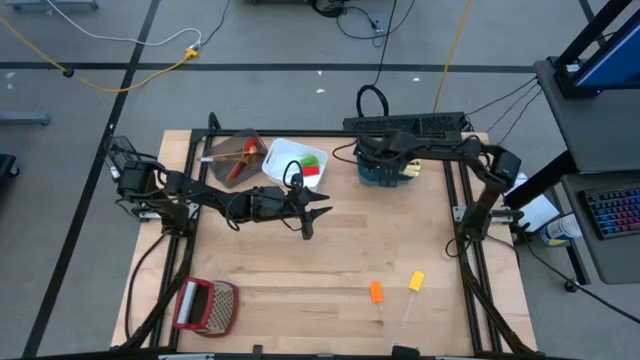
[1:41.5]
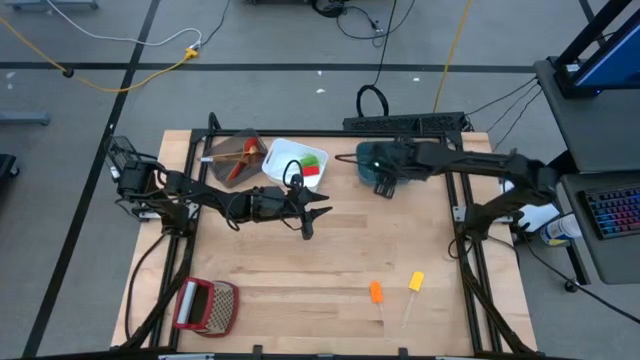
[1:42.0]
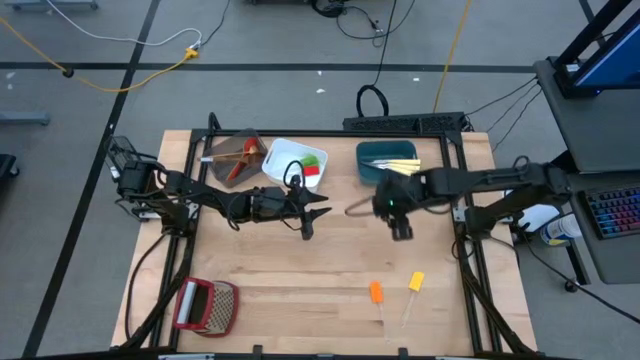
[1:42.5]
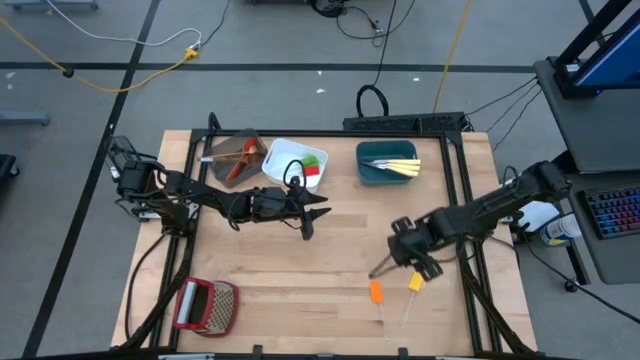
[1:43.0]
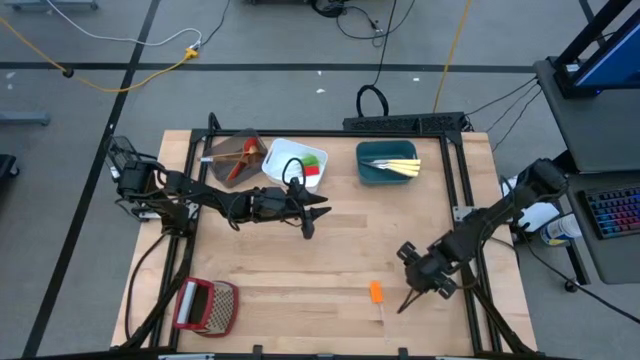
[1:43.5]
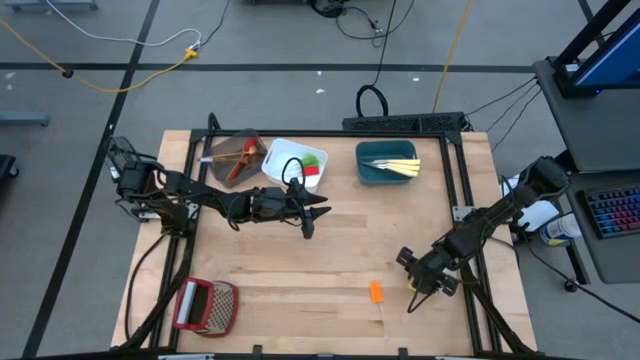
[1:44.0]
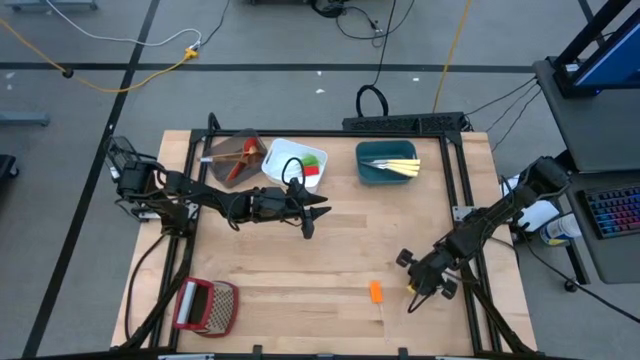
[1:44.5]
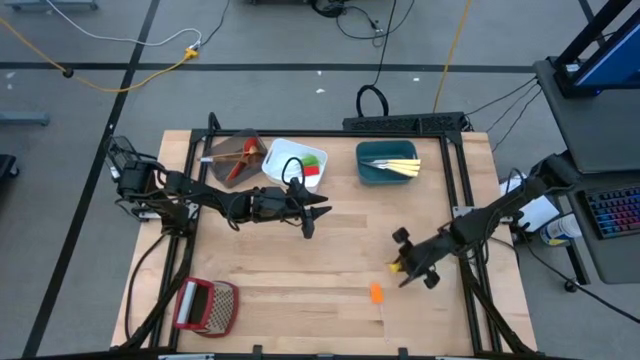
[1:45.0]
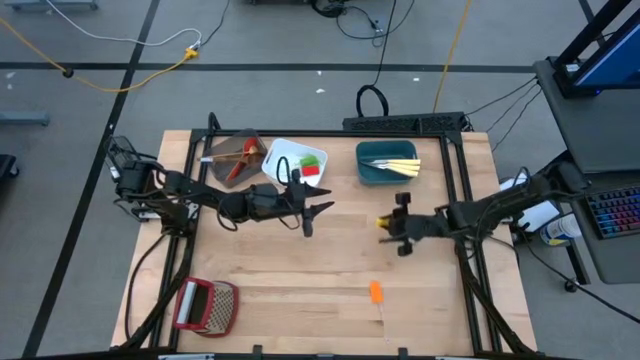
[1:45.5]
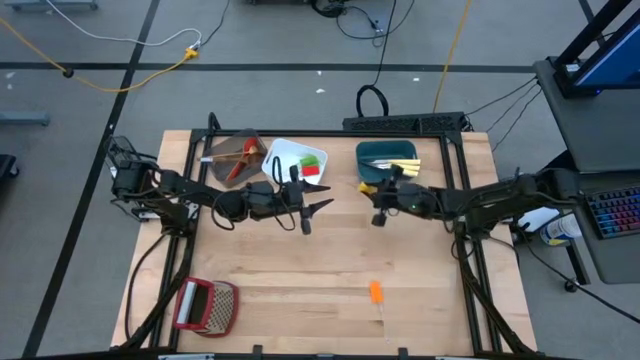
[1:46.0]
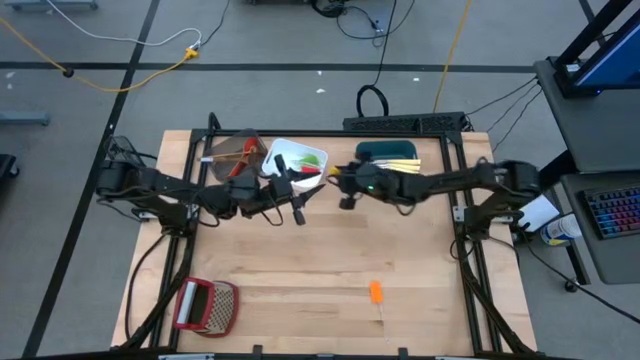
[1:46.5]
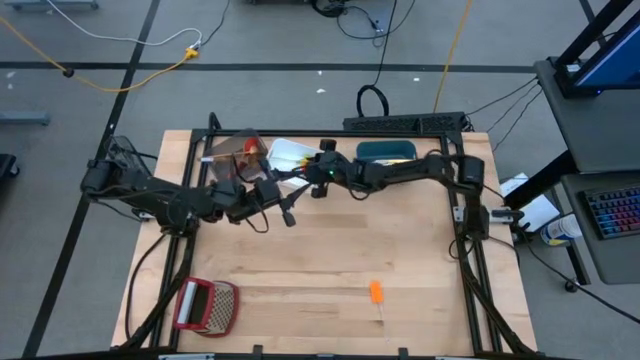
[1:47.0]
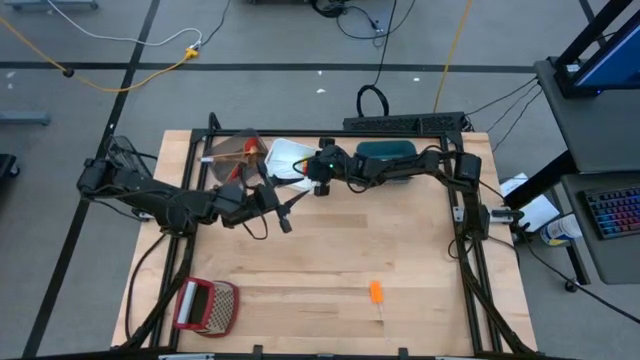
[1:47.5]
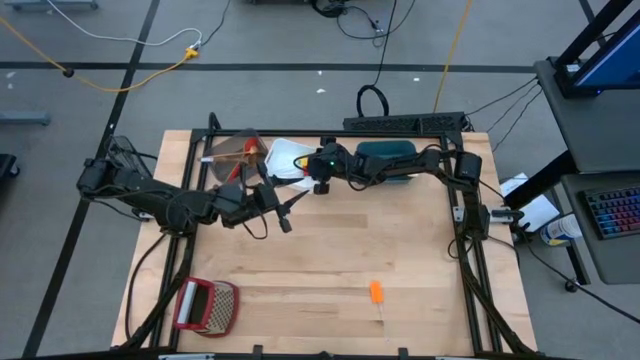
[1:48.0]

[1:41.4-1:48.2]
Task: Pick & Place Kitchen Items
Put the yellow spatula into the white bin

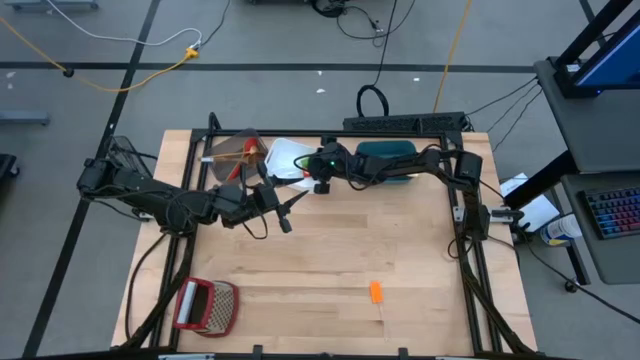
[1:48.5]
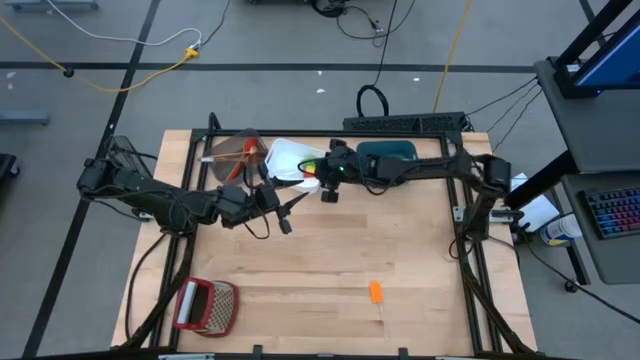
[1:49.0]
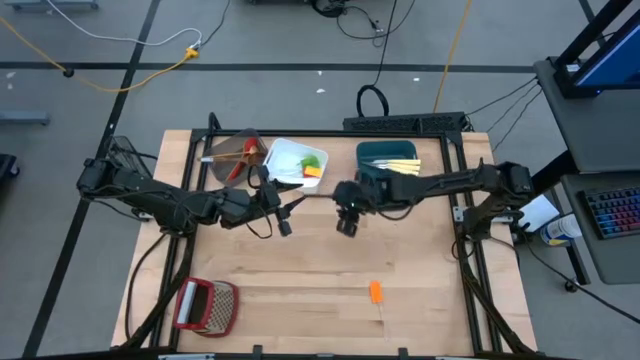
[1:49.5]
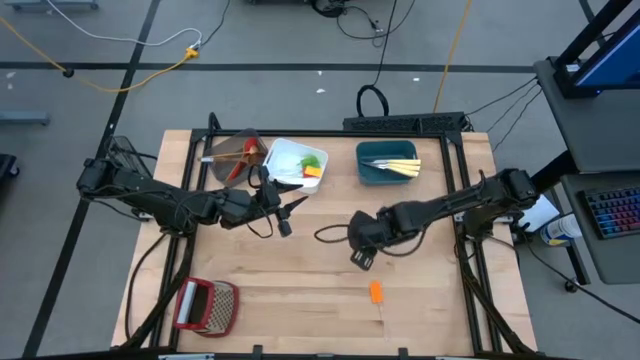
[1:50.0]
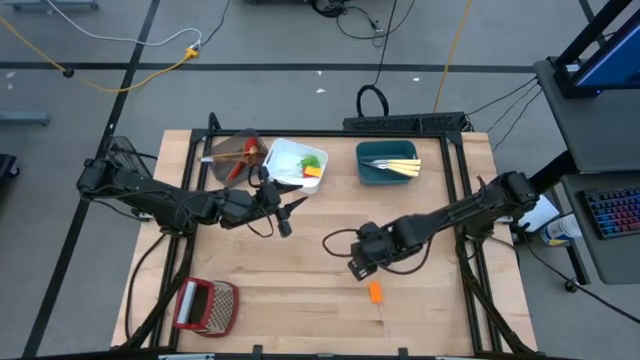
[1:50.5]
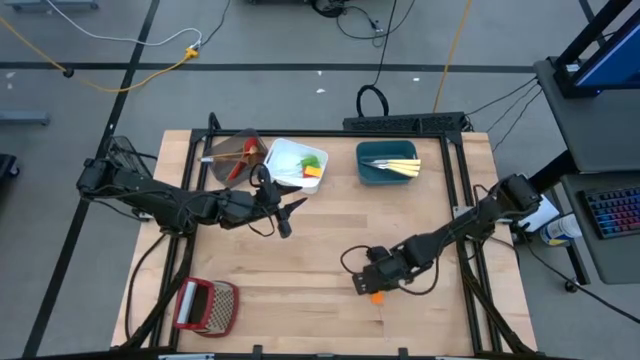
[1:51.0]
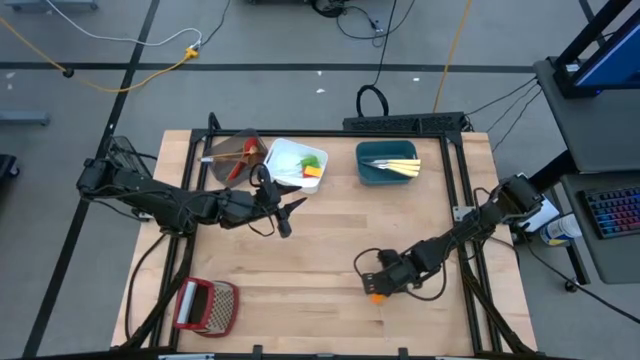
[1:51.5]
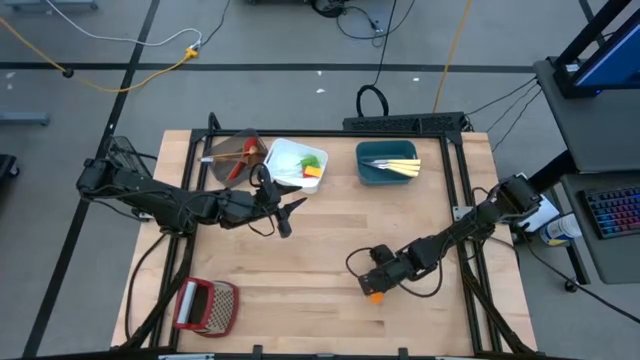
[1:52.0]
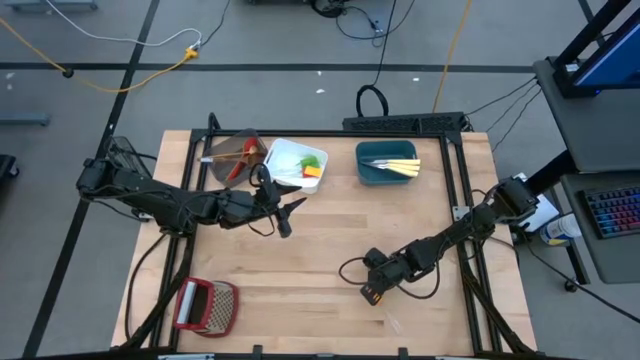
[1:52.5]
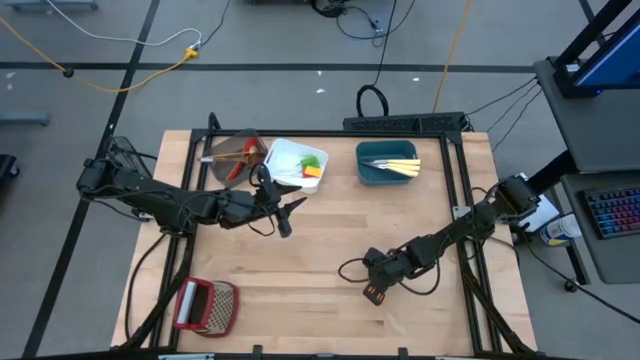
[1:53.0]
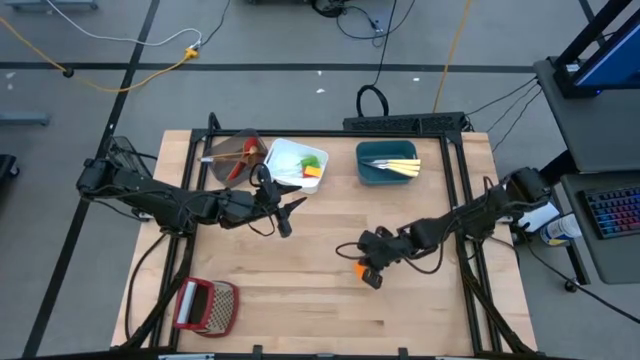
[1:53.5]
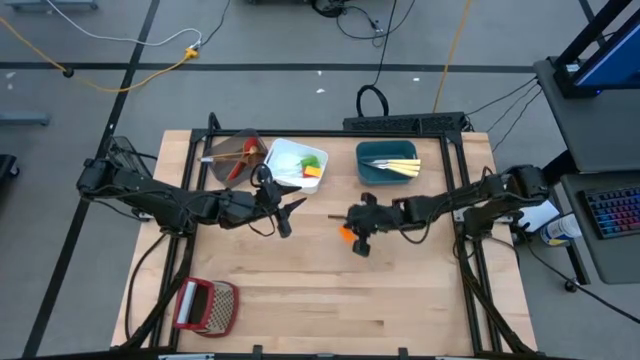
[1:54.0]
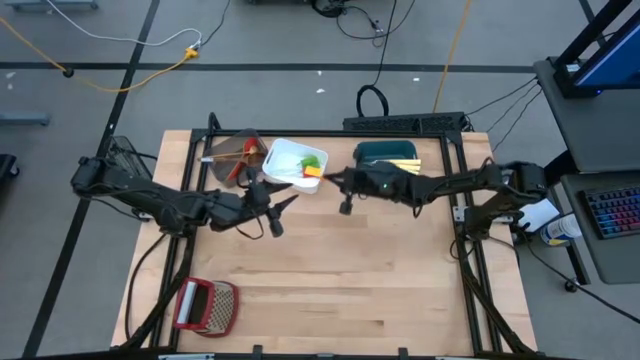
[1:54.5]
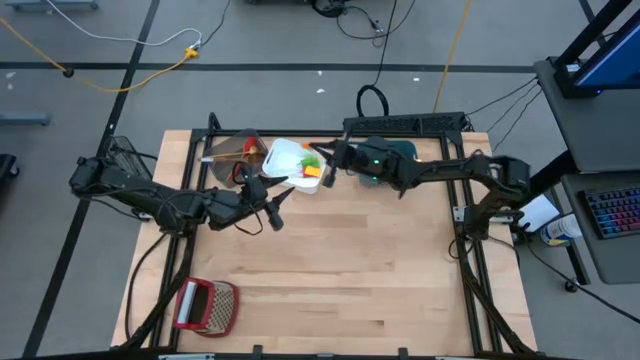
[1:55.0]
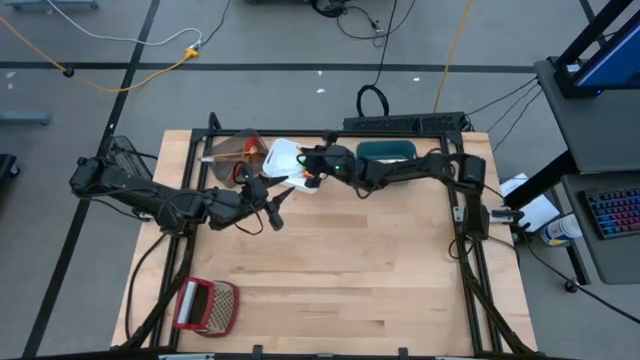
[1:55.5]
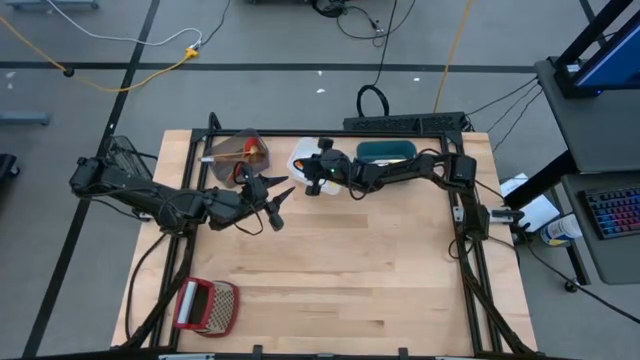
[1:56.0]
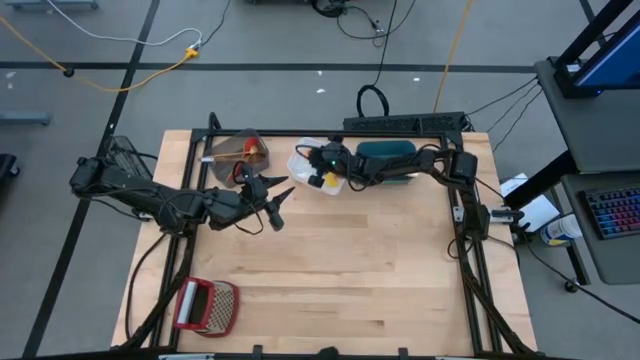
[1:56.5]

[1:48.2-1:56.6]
Put the orange spatula into the white bin

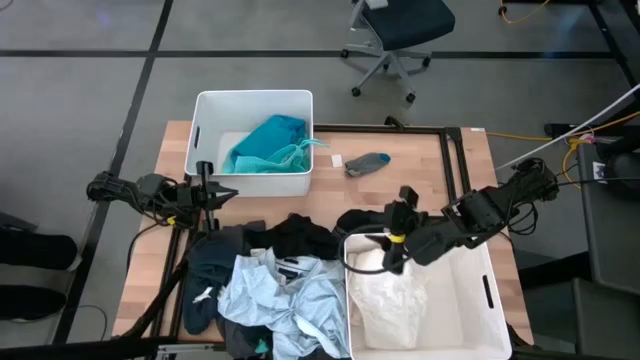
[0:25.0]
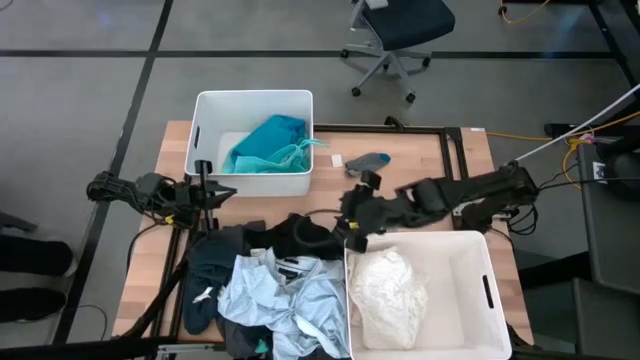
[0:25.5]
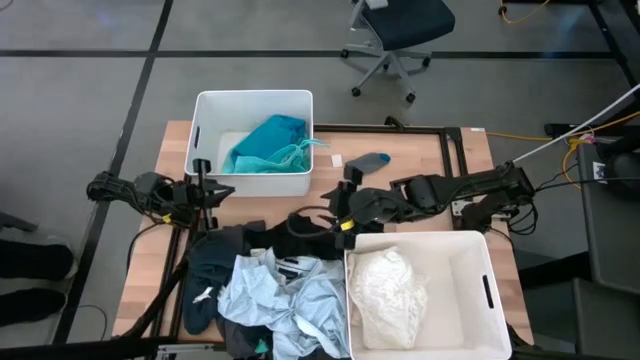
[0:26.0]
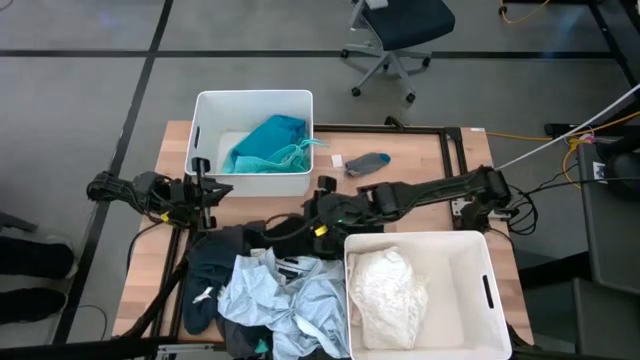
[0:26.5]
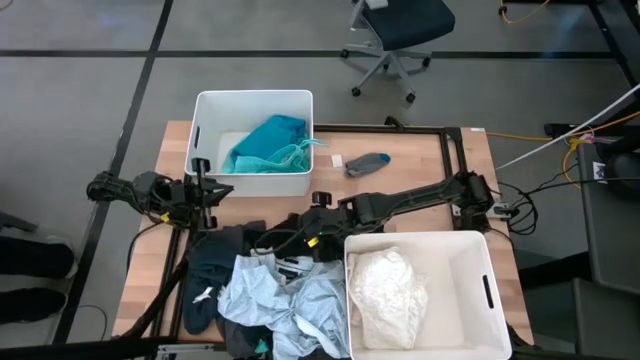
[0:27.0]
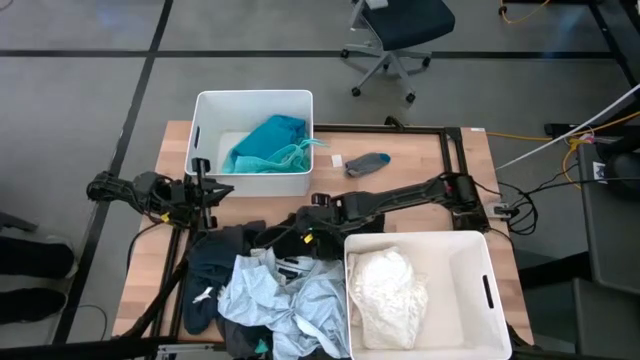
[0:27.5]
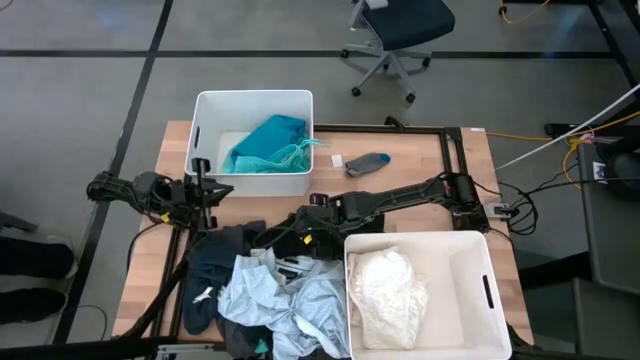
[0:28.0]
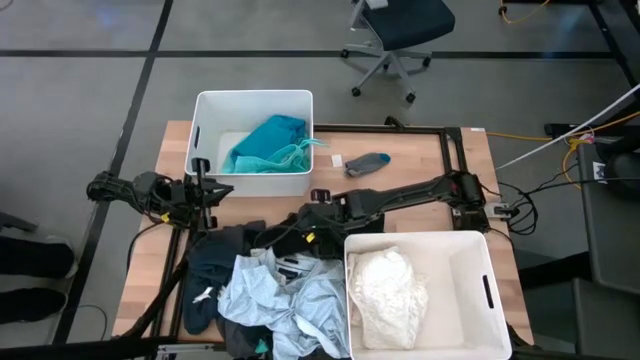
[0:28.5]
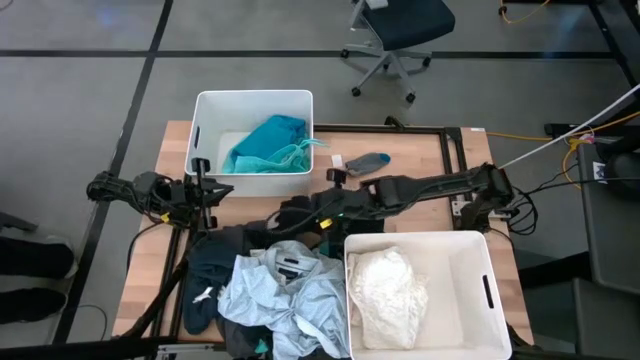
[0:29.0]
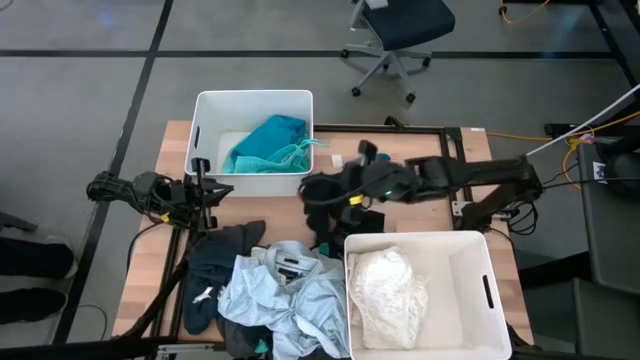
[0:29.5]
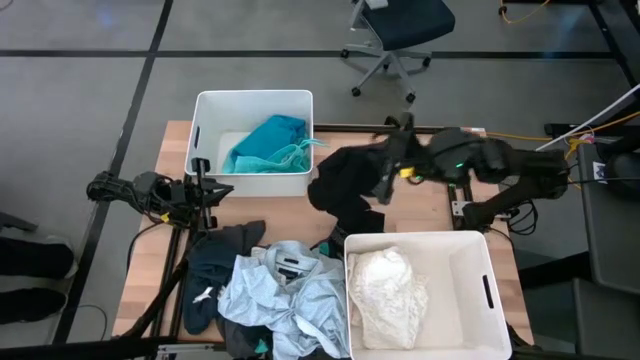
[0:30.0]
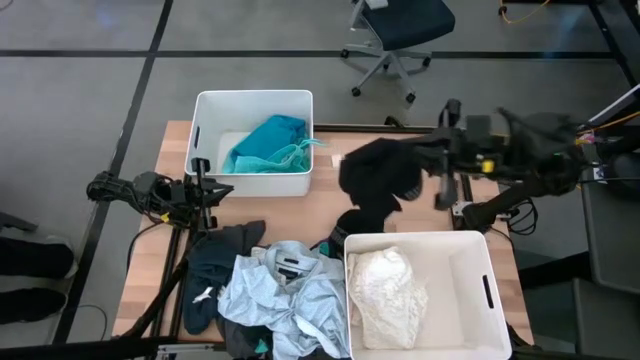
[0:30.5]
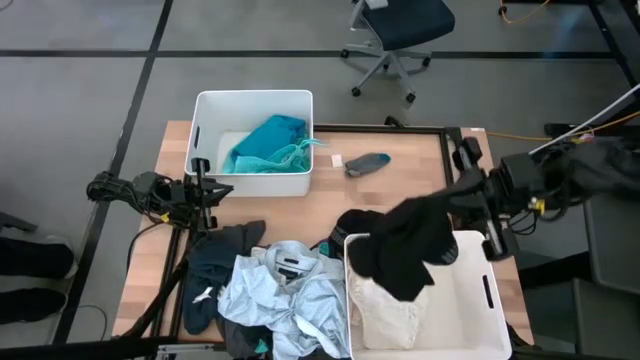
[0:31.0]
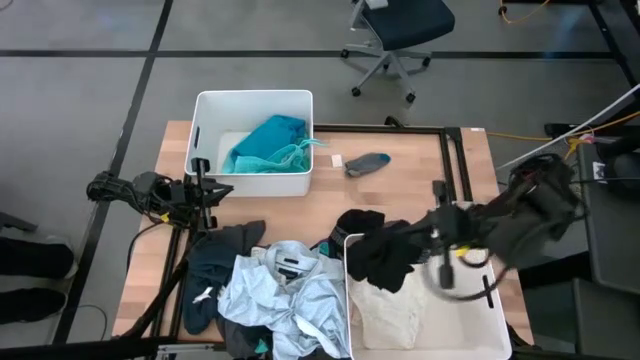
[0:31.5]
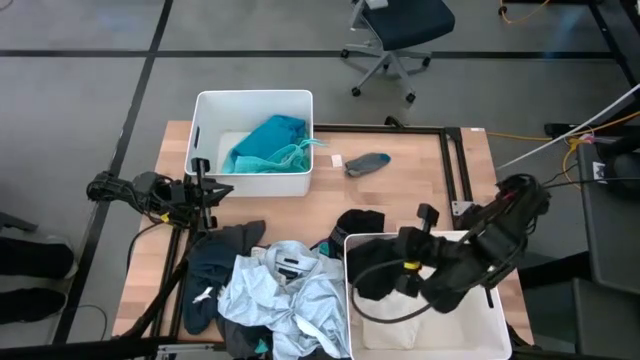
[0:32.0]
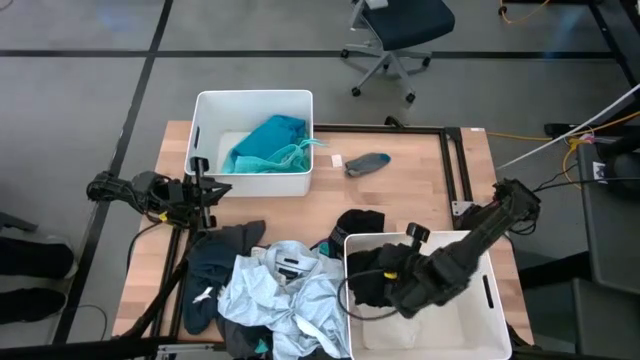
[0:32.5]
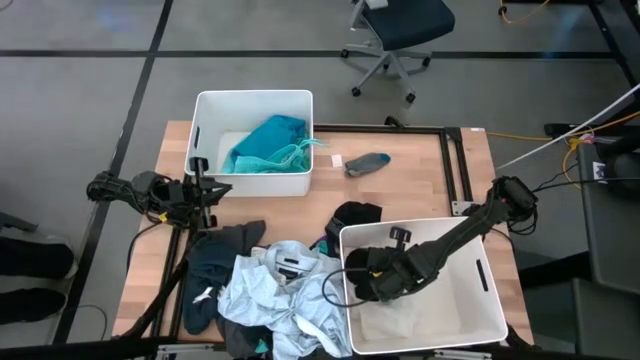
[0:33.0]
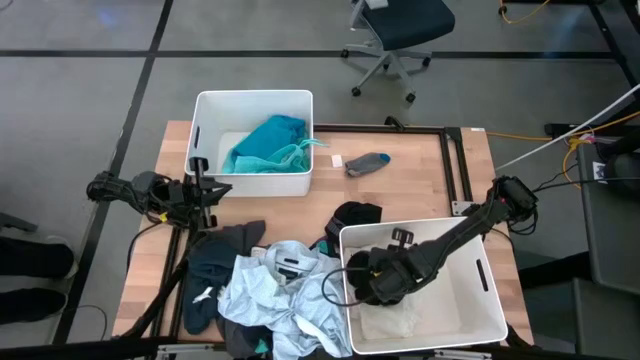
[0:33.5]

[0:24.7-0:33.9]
Task: Sort clothes
Put the black underwear into the bottom white laundry bin
